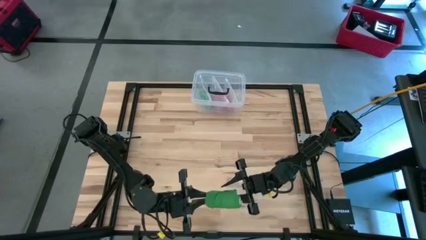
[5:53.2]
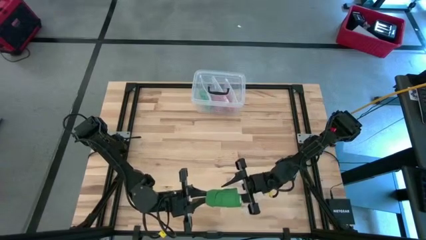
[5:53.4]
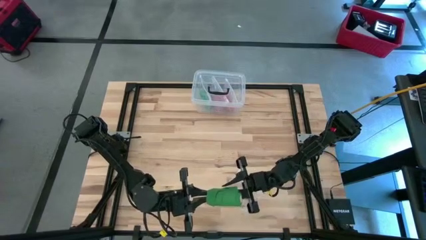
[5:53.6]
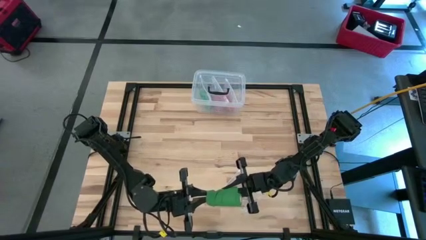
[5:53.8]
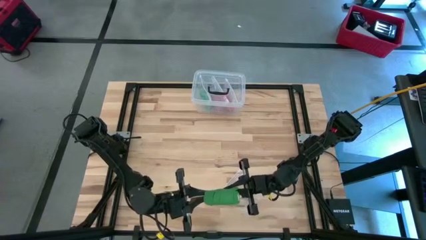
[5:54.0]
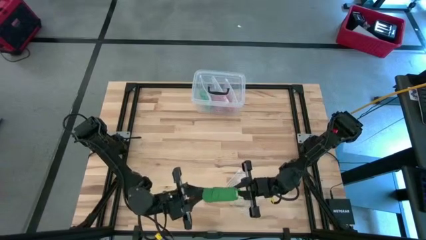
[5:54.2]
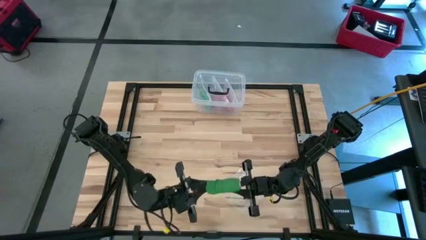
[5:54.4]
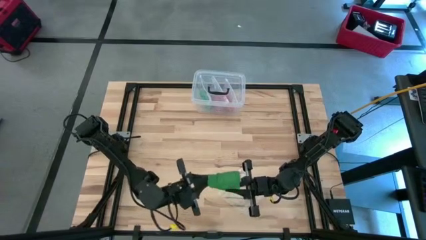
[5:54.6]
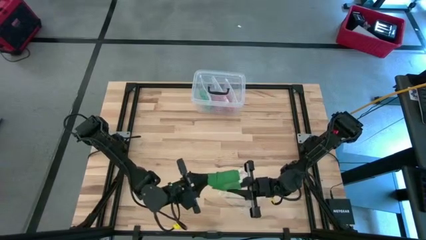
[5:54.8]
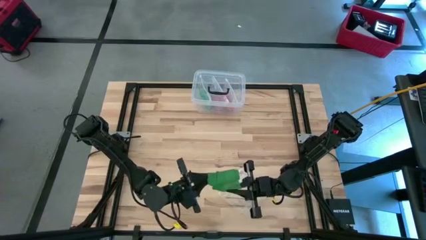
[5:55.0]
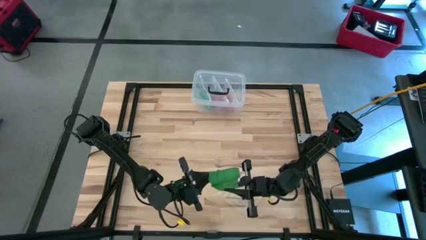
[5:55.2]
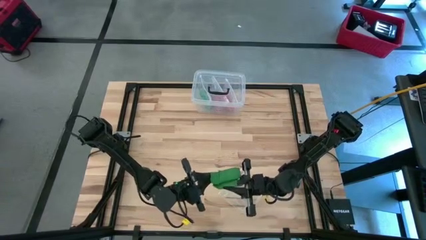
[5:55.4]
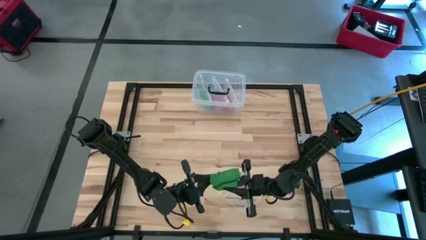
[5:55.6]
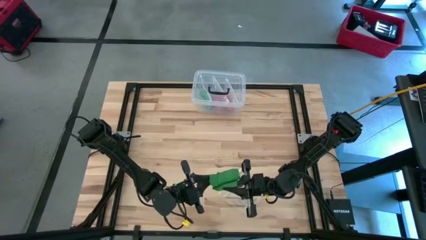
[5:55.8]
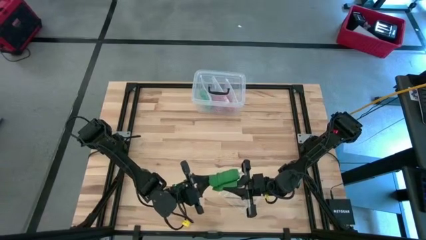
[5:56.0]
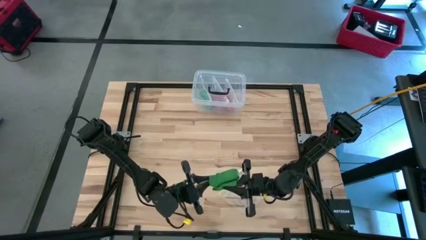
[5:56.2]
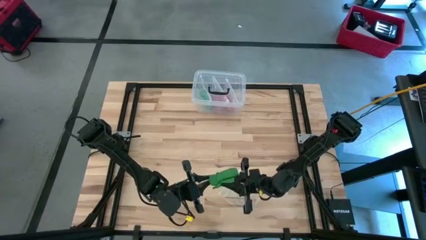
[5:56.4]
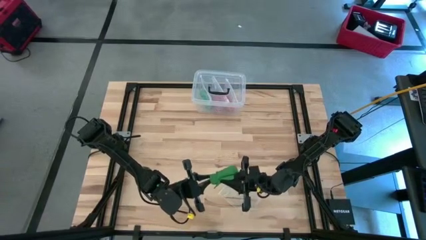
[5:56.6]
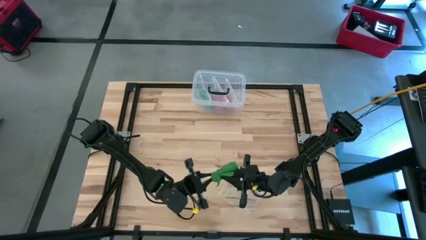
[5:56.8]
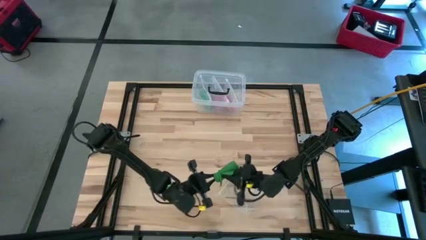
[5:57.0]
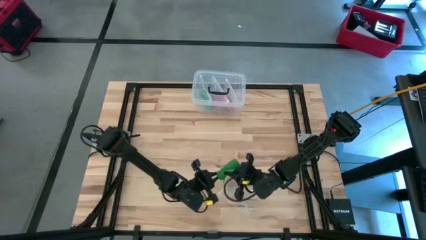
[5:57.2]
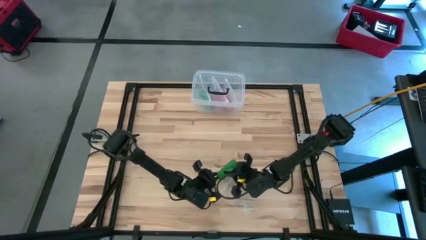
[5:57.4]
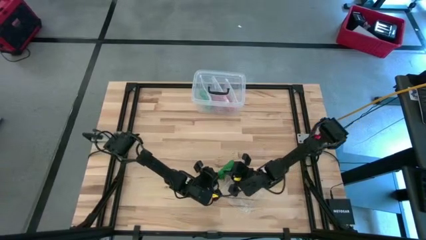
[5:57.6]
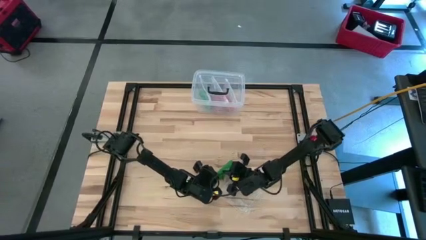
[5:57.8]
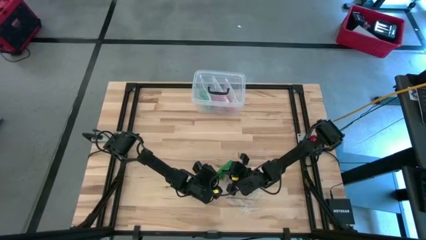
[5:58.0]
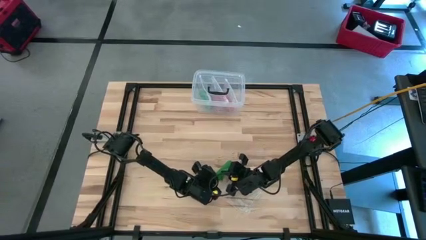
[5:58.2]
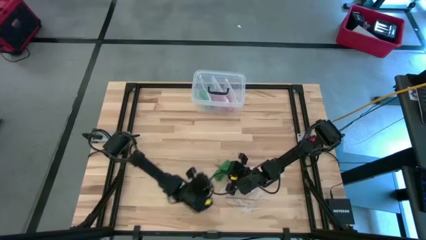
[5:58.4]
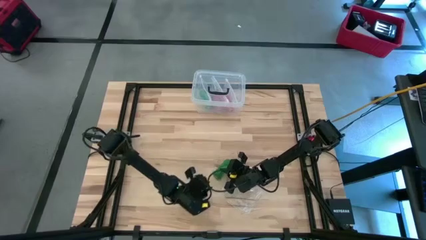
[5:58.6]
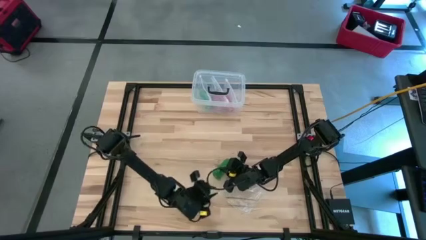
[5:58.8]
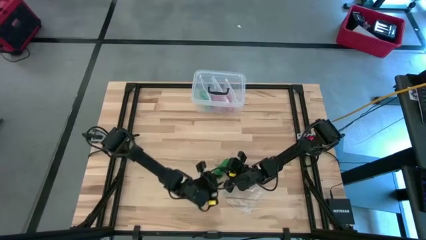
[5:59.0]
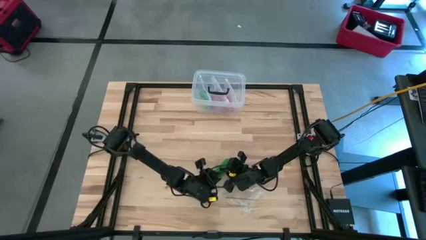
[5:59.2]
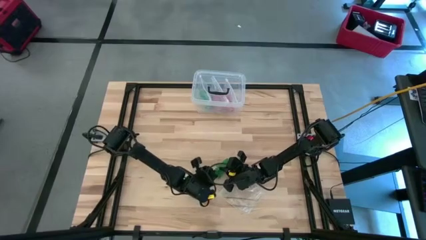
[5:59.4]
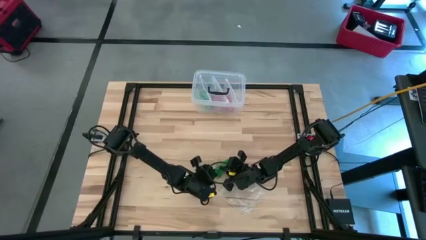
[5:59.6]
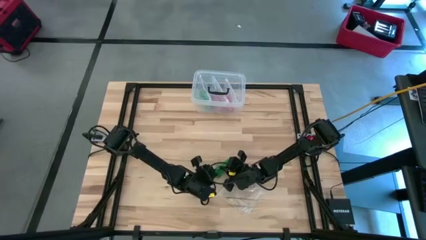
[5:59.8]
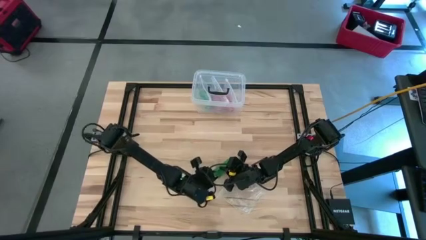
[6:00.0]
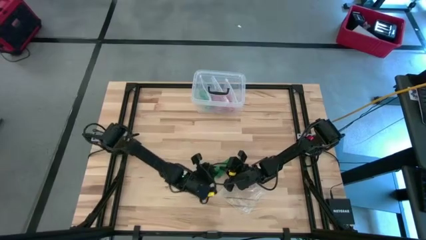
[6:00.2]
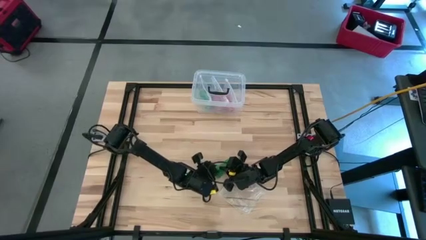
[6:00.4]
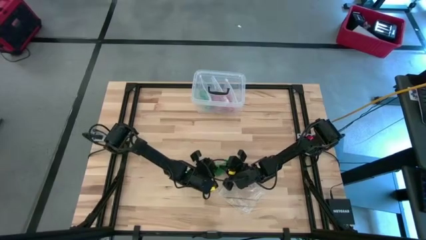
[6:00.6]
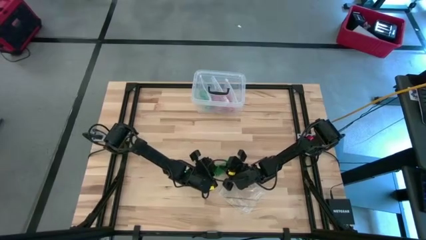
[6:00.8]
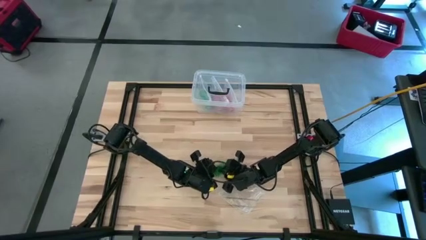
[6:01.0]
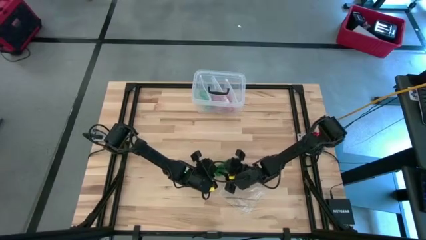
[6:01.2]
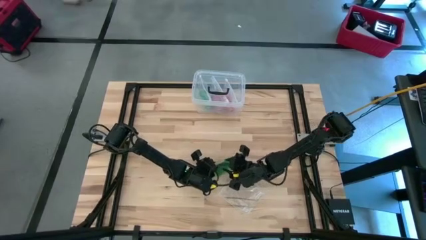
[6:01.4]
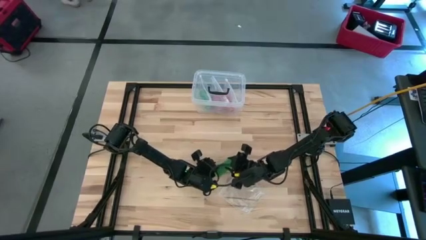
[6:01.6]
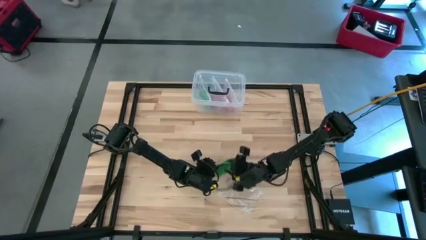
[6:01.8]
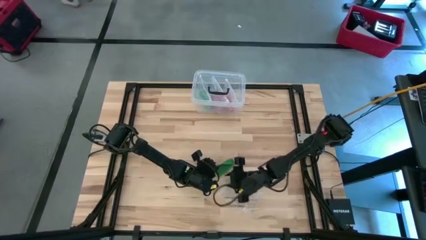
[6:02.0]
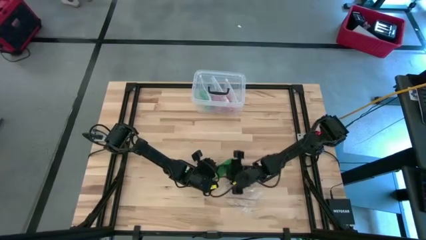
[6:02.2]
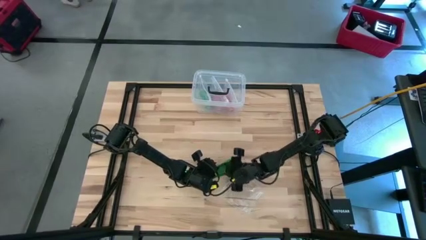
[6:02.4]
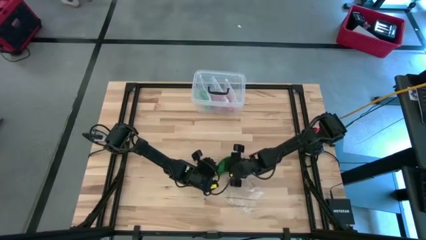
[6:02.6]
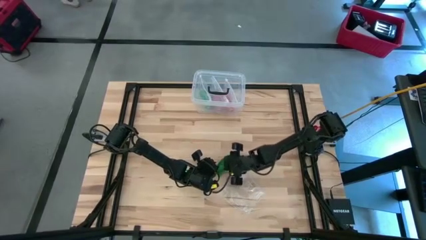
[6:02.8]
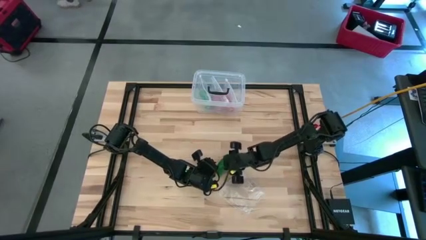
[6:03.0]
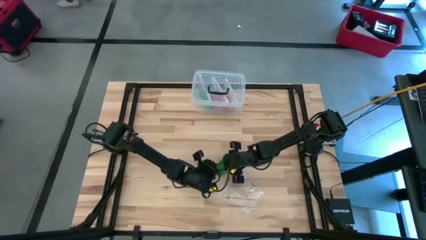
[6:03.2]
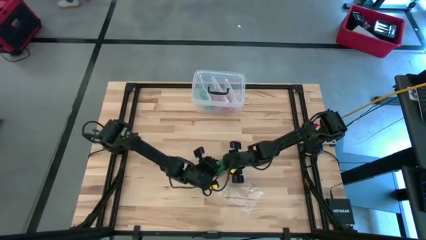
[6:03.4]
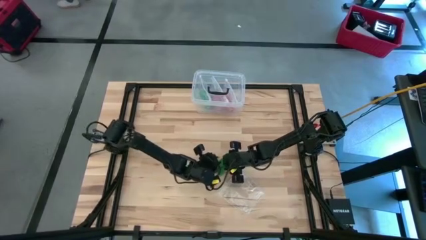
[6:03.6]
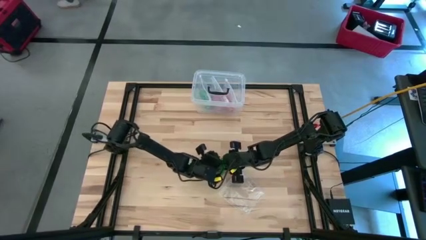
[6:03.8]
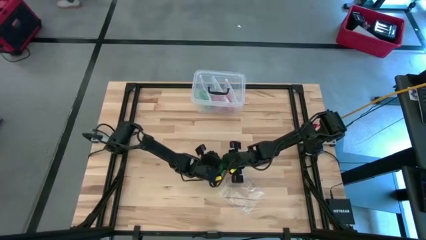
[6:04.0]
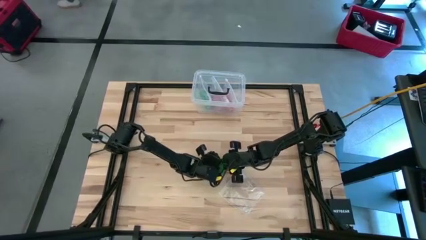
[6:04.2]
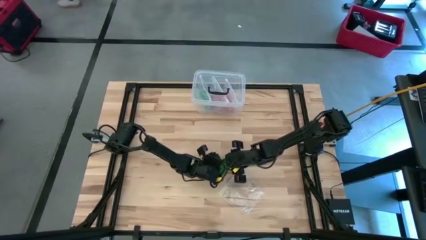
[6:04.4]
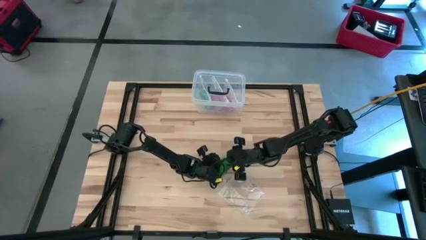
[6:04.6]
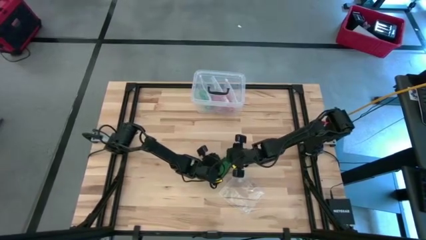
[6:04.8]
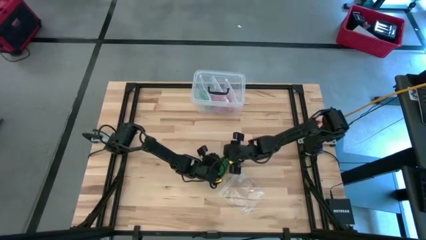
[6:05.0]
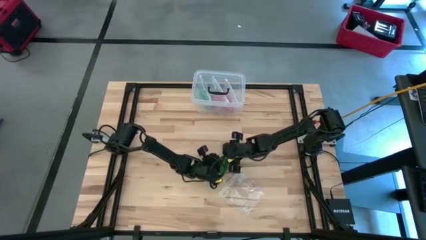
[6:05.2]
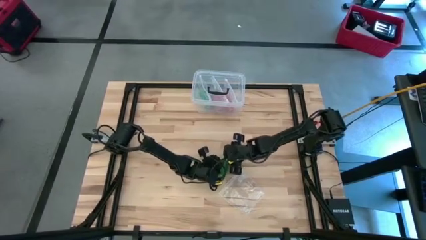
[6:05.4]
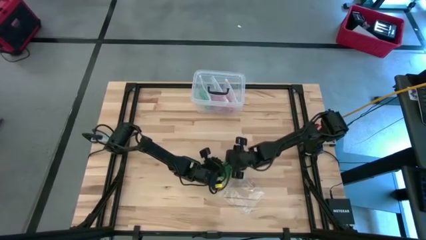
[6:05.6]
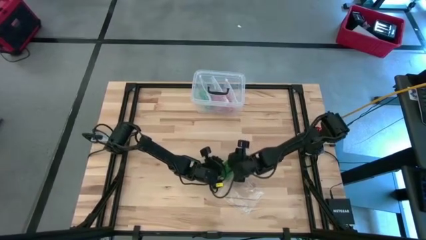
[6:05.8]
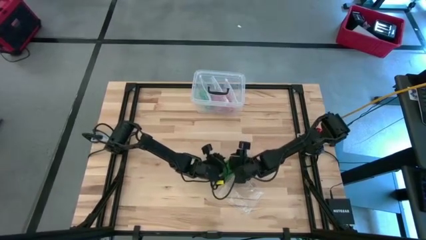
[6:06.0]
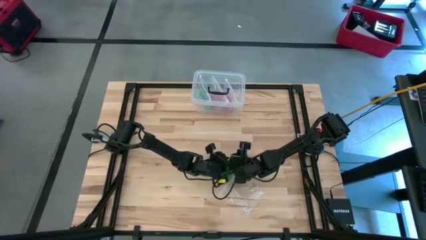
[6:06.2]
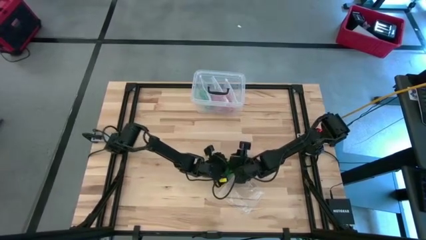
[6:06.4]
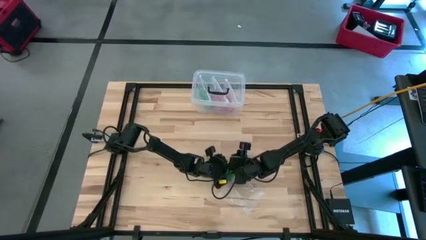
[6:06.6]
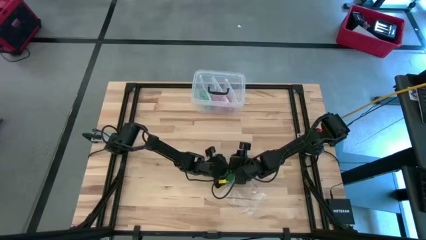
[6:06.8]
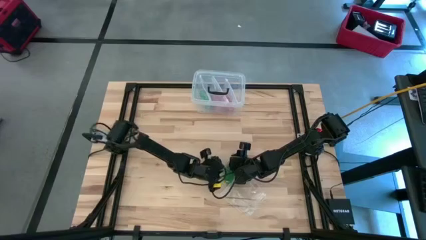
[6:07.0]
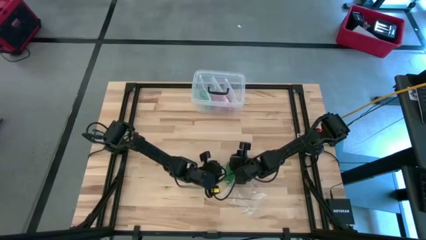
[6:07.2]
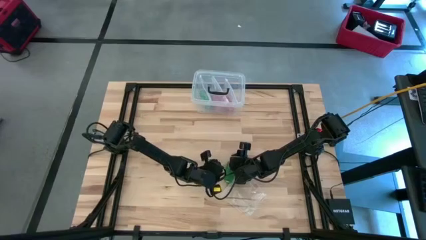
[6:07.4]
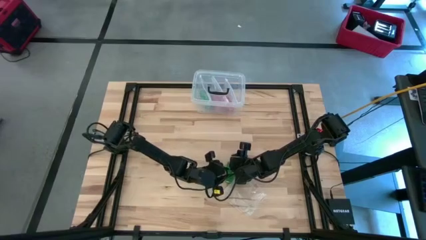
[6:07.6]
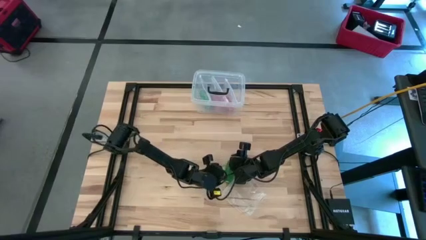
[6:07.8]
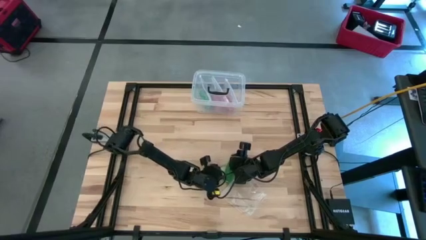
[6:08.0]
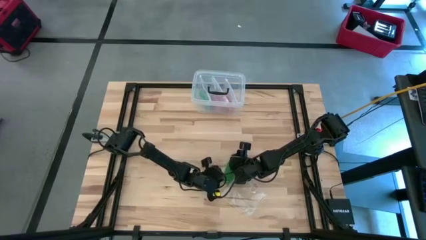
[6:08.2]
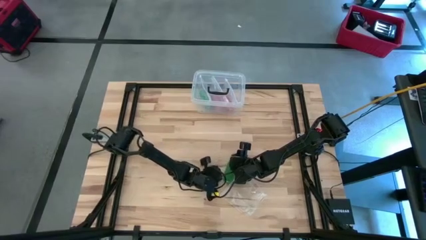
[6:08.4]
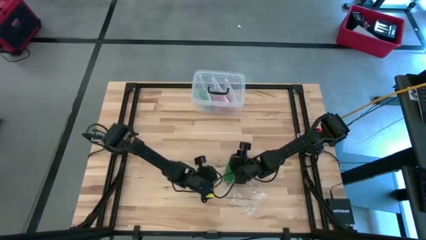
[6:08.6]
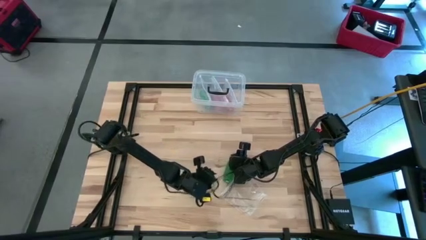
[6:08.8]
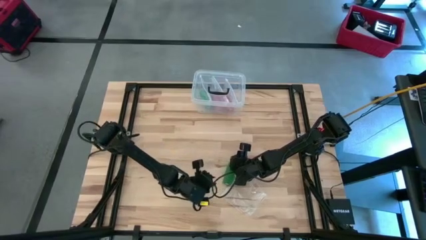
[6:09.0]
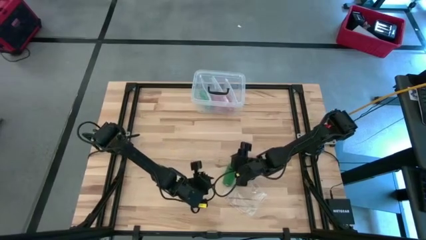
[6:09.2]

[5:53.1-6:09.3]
Task: Roll bandage
Roll the green bandage
